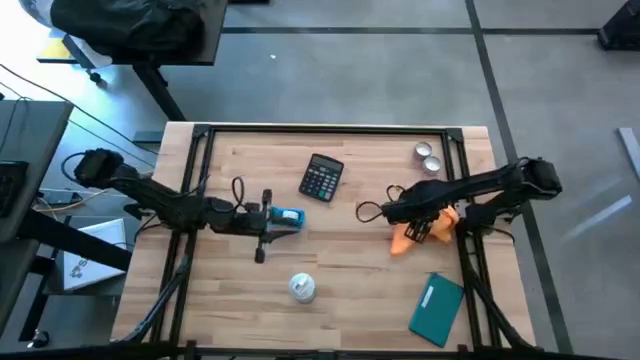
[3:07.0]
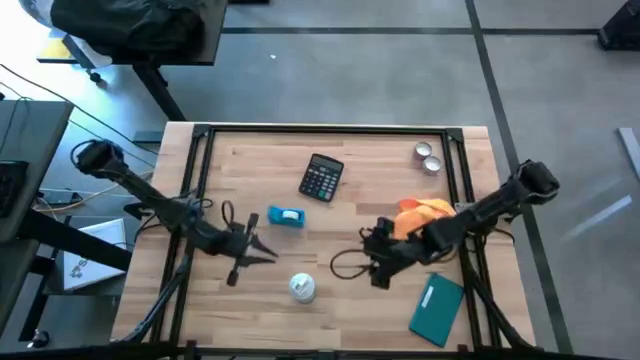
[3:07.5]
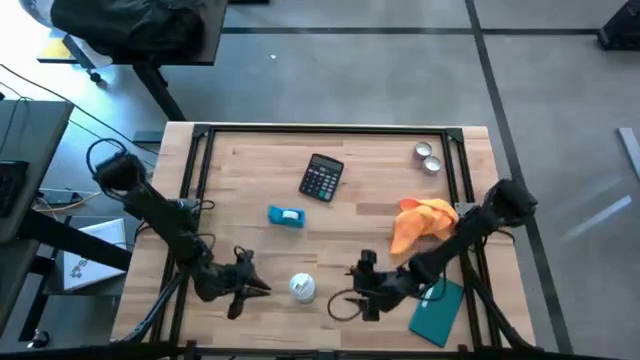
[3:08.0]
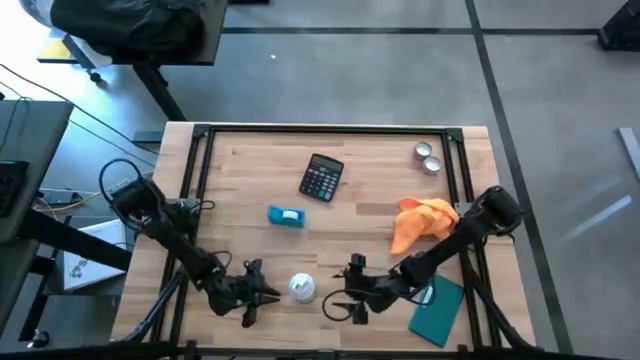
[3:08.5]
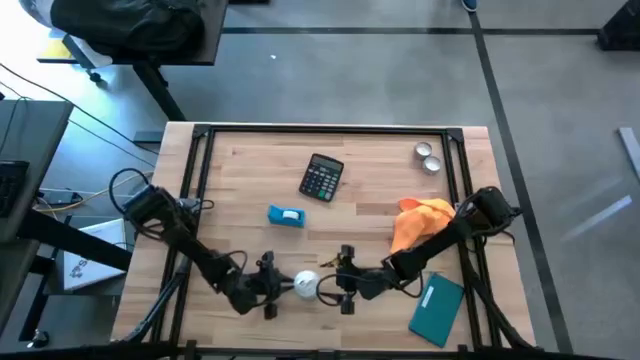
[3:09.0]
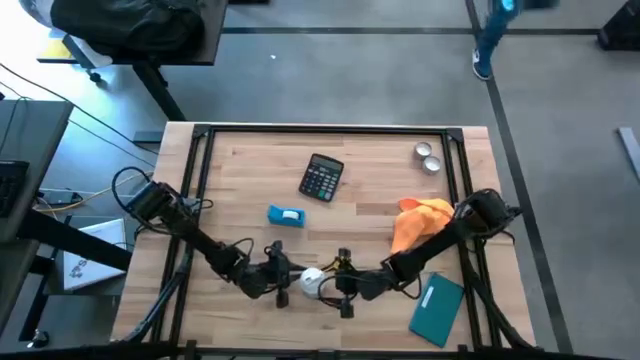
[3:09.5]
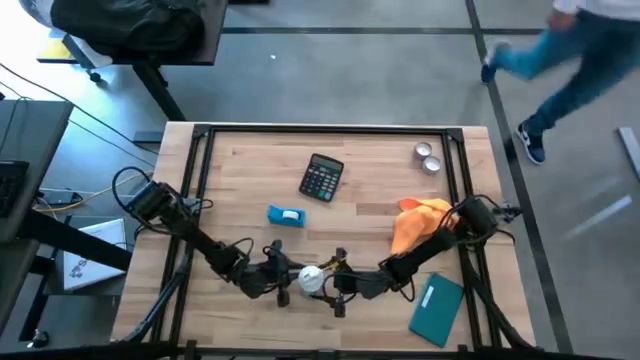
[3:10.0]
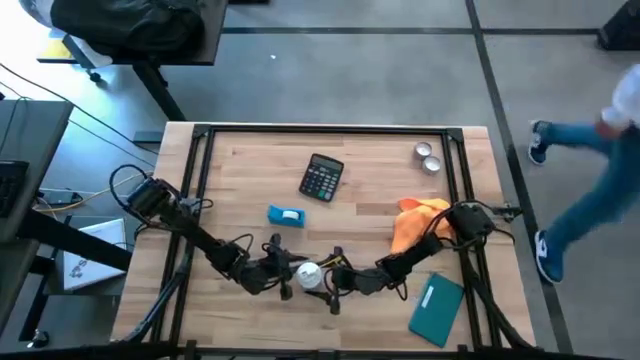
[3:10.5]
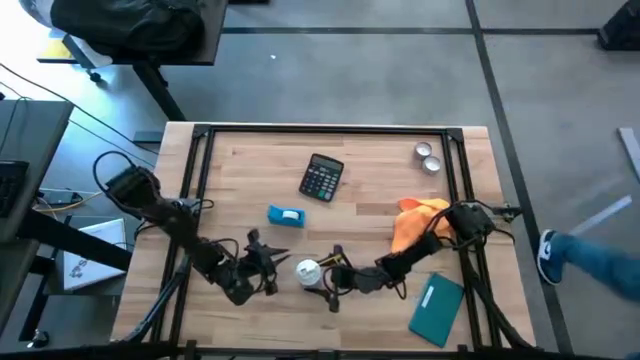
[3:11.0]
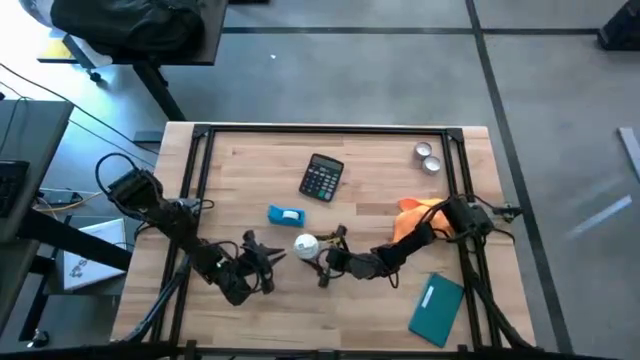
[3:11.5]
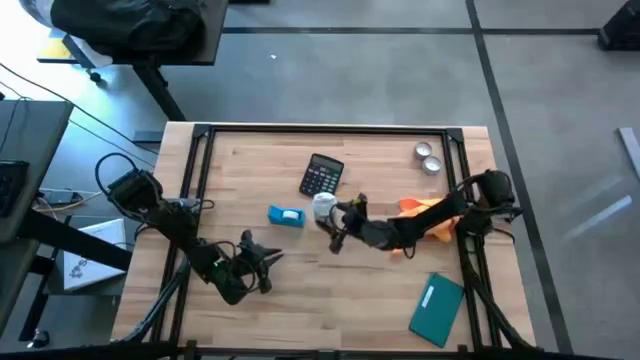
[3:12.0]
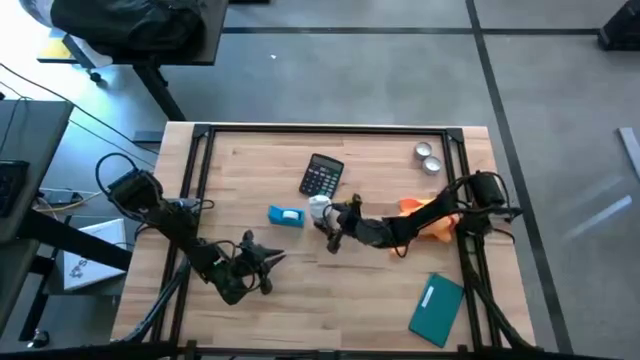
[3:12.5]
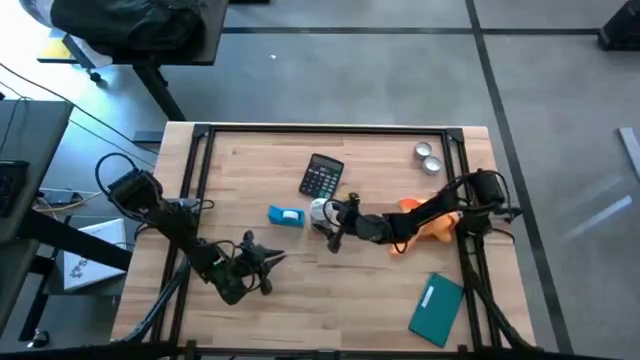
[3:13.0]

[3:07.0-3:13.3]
Task: Apply microfiber cloth
Move the spray bottle to the center of the table

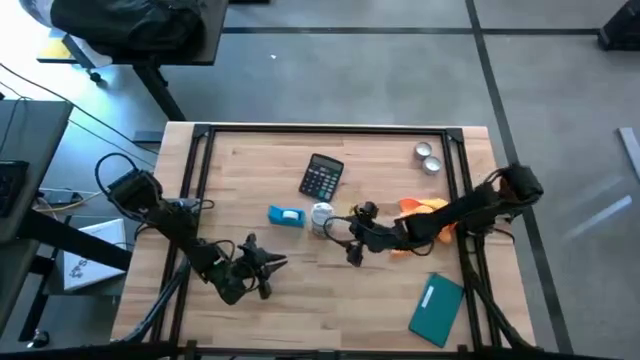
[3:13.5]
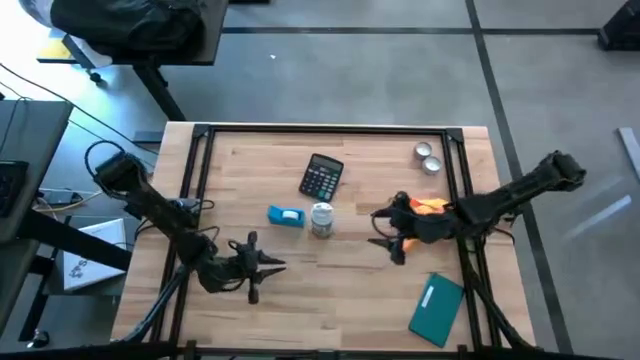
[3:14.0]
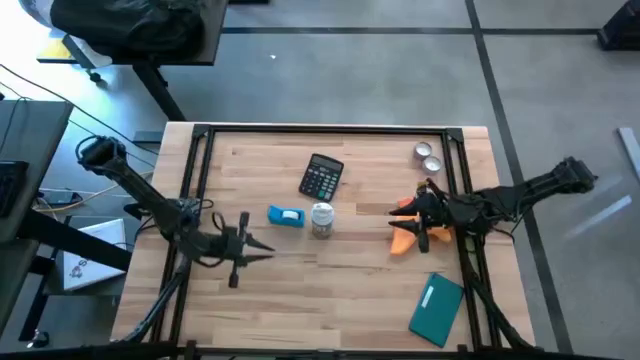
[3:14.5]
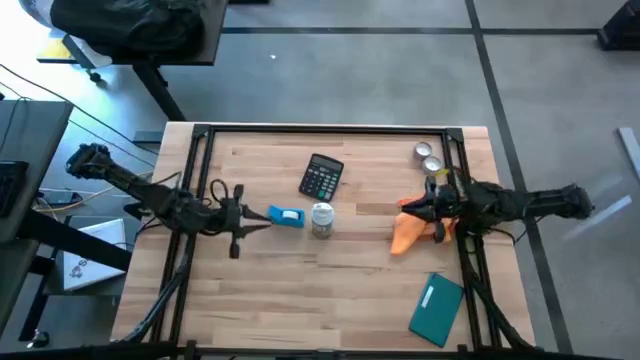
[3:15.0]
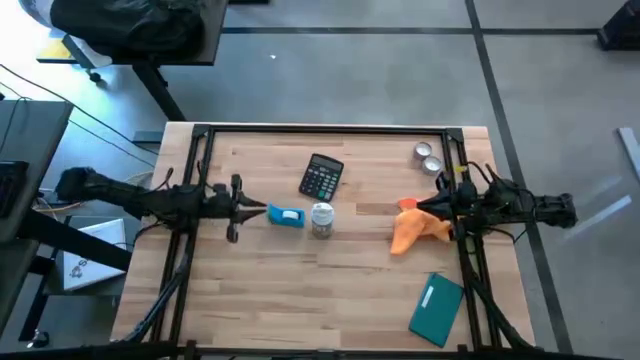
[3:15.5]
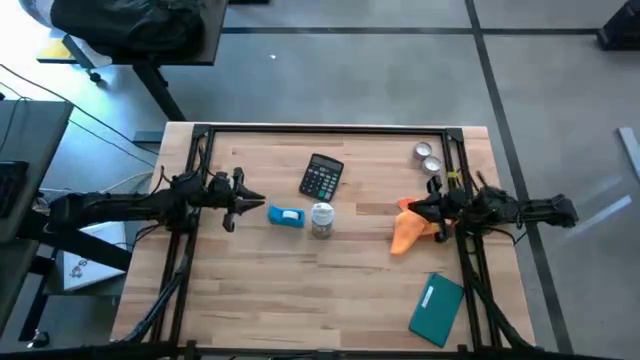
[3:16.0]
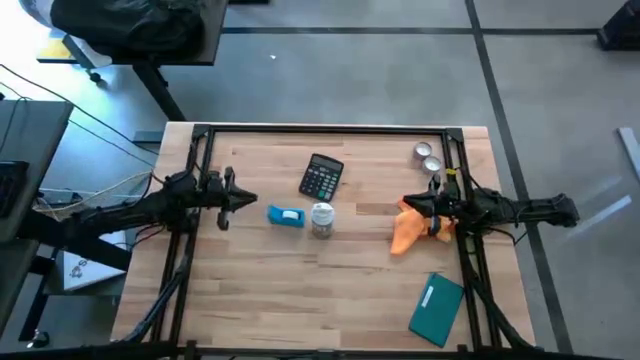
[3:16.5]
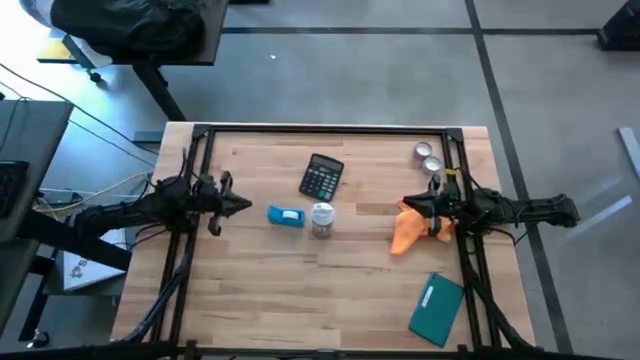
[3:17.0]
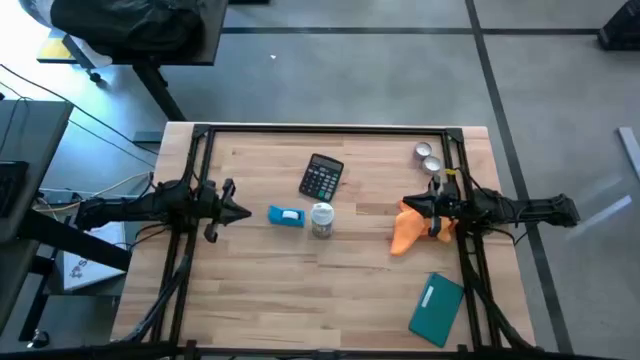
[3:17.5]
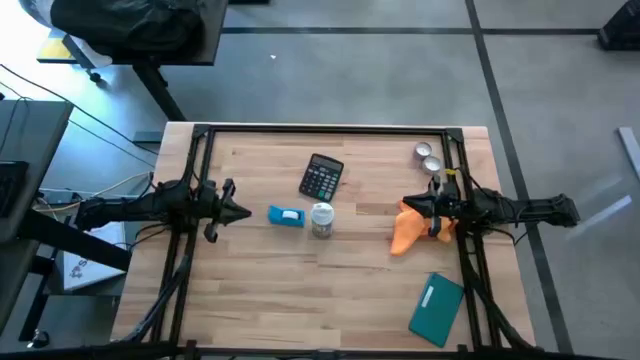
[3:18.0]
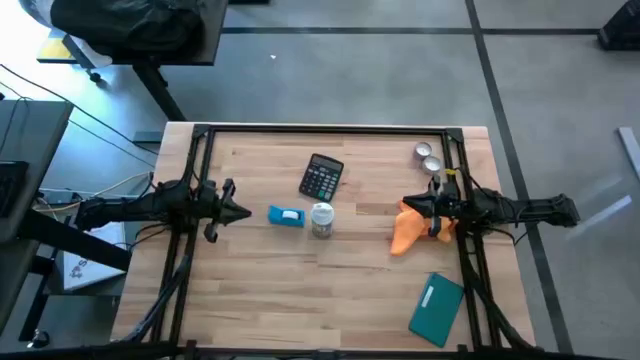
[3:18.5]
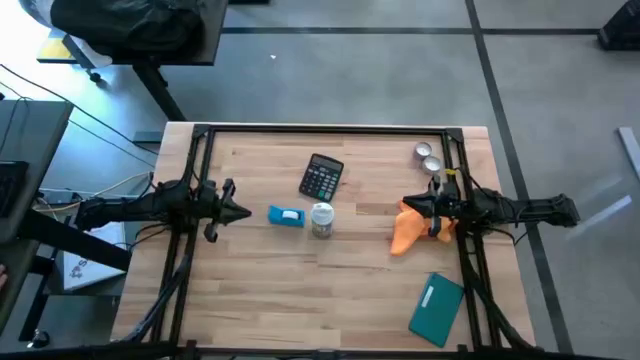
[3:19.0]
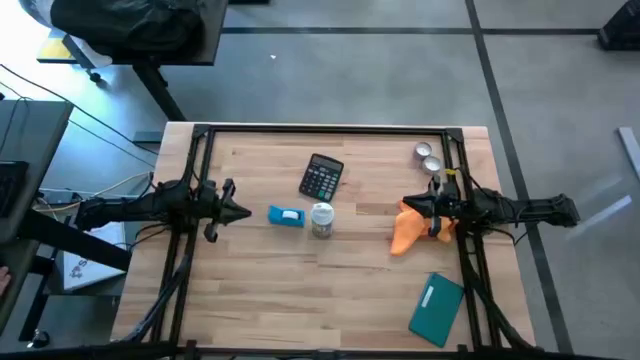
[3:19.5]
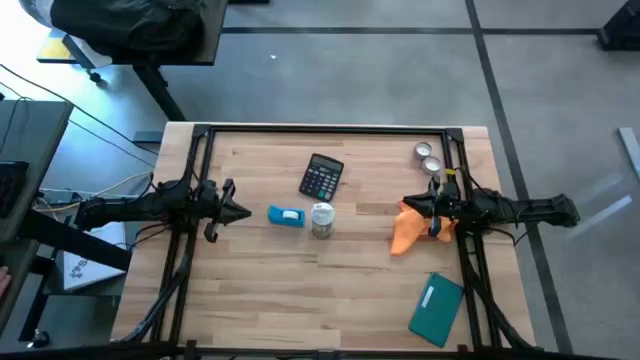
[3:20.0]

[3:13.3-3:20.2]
Return to Home Position

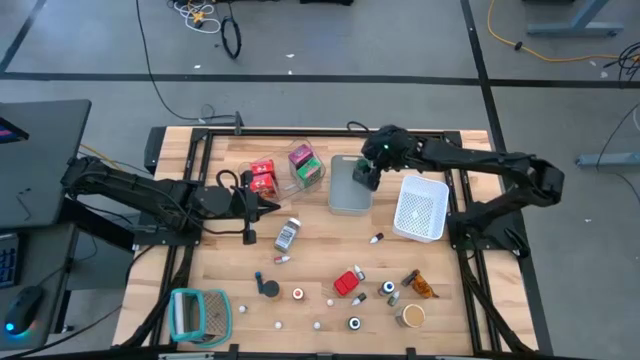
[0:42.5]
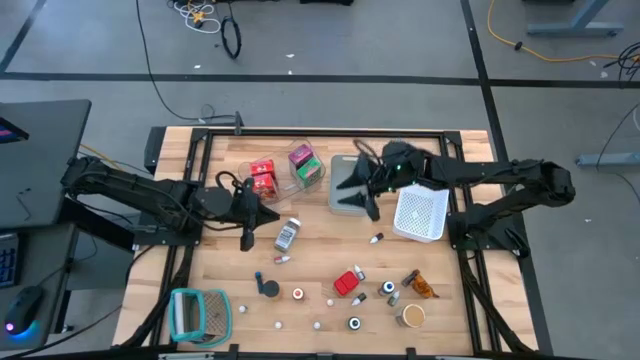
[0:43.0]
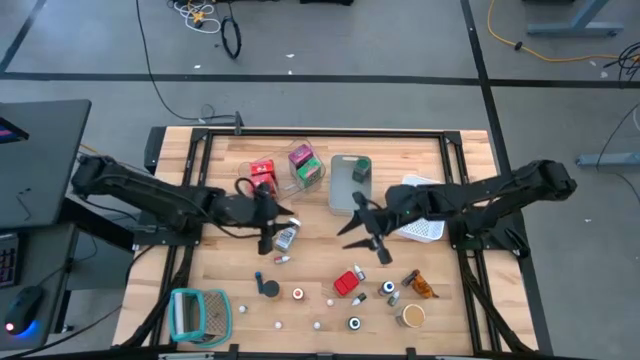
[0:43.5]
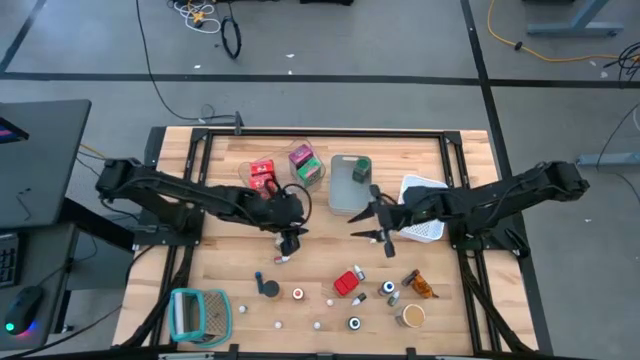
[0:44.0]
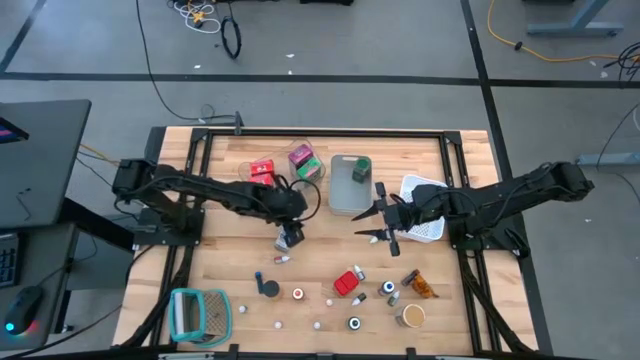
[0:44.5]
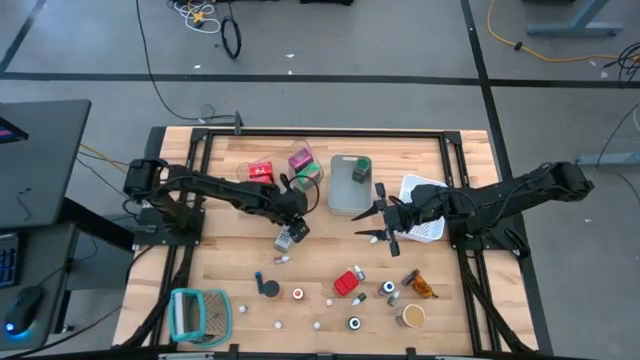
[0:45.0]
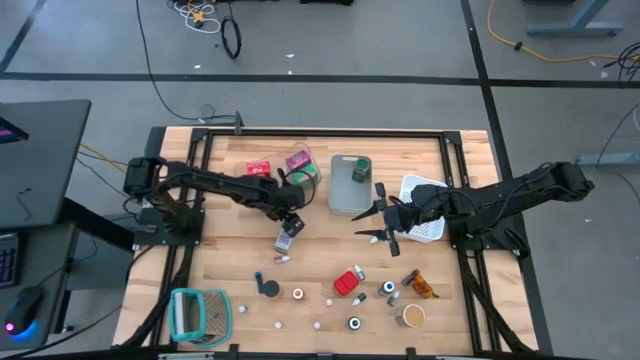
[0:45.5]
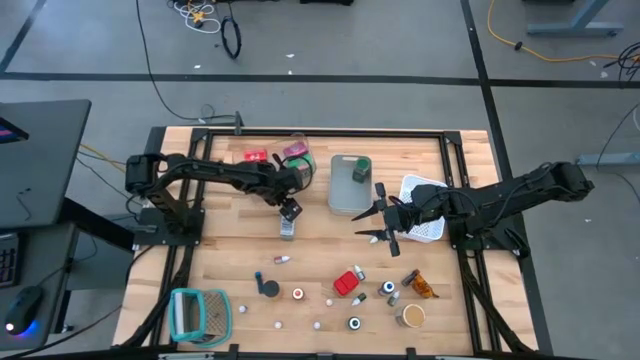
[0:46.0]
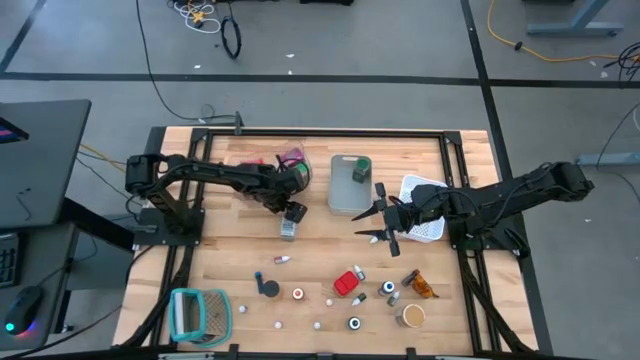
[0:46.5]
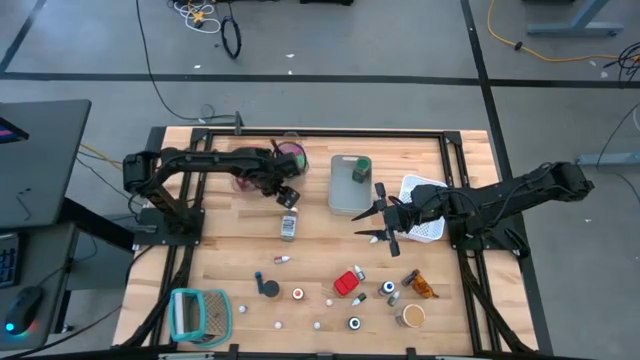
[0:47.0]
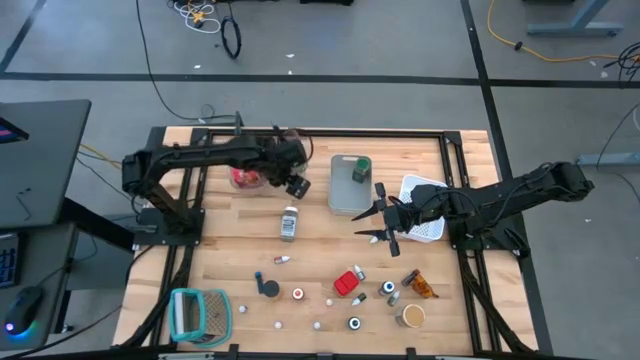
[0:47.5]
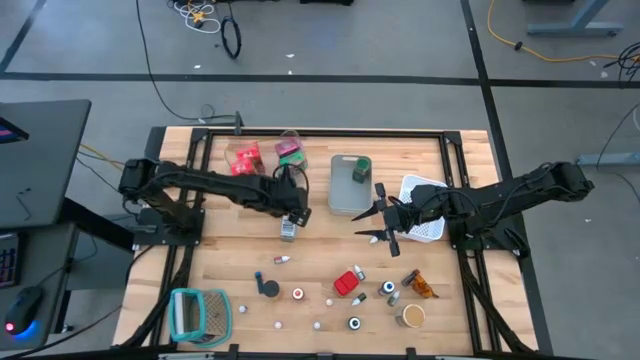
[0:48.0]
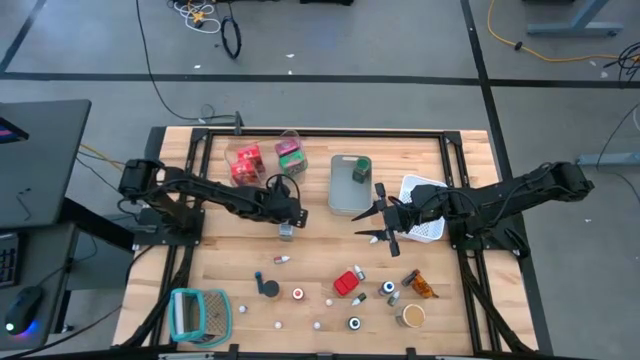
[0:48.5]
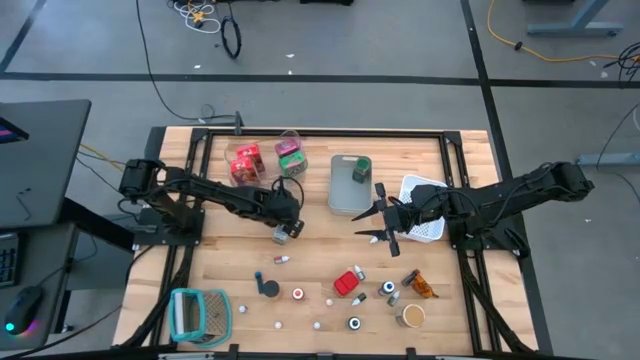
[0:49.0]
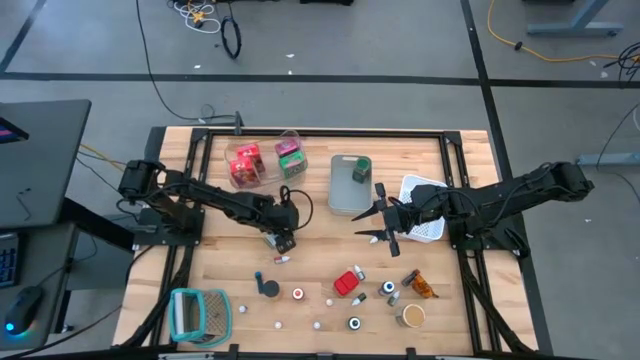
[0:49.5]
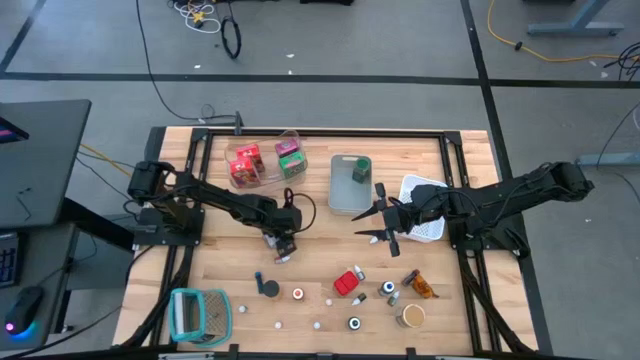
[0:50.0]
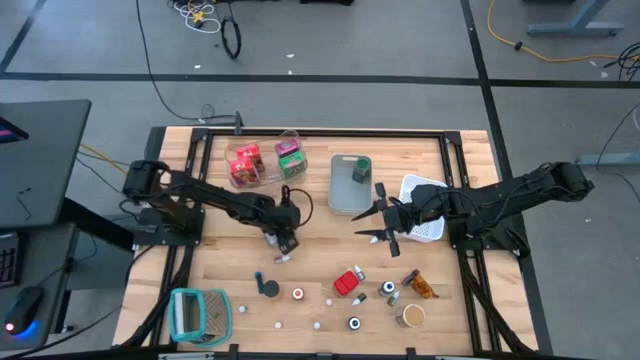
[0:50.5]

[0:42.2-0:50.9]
Task: Pick & Place Kitchen Items
Put the white spice bottle into the gray bin
